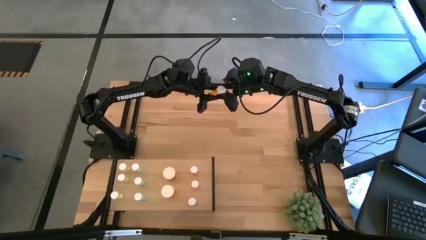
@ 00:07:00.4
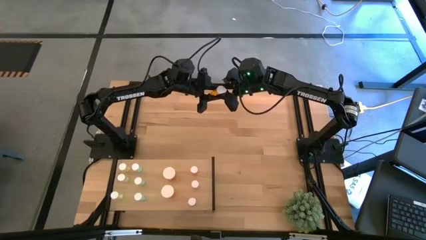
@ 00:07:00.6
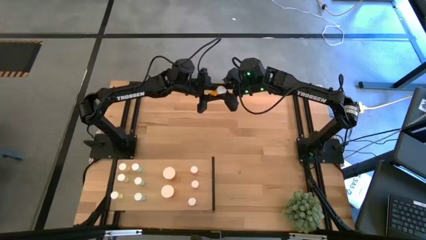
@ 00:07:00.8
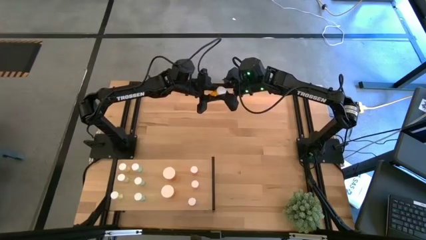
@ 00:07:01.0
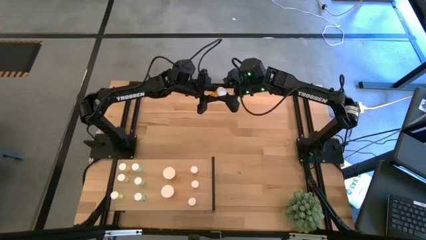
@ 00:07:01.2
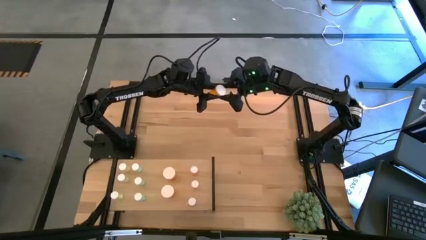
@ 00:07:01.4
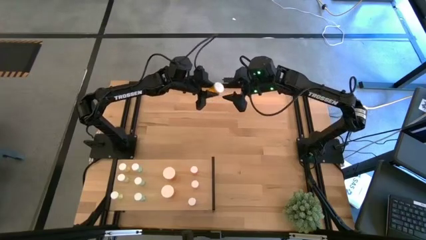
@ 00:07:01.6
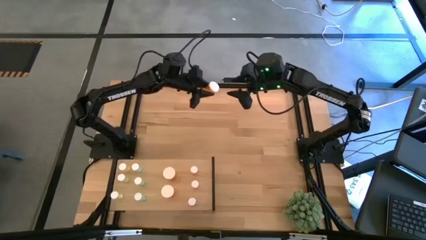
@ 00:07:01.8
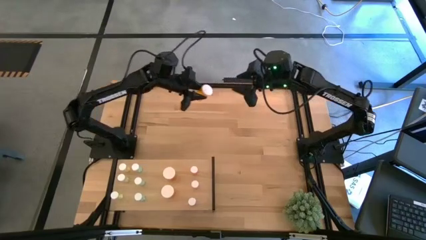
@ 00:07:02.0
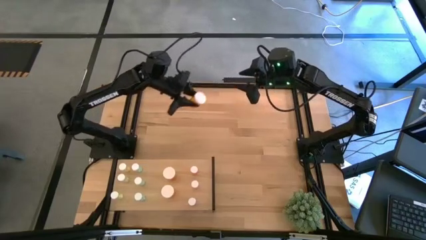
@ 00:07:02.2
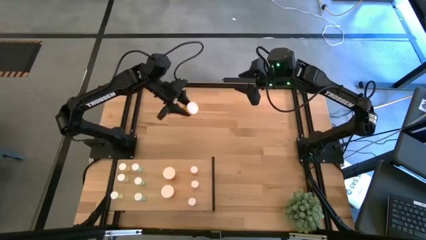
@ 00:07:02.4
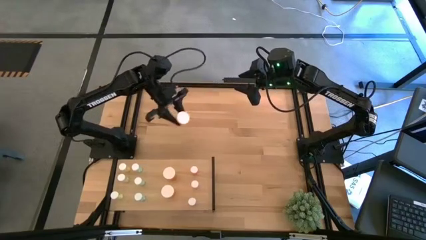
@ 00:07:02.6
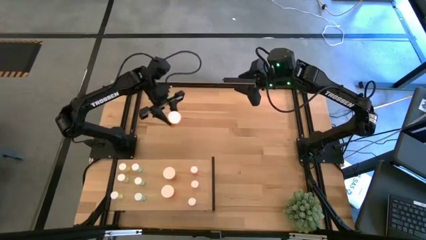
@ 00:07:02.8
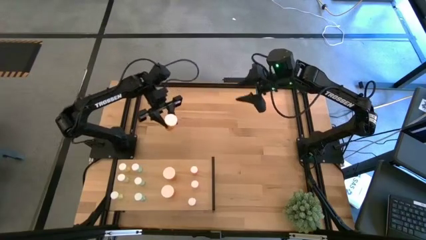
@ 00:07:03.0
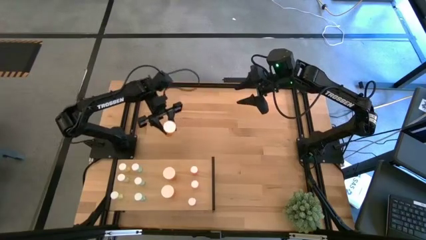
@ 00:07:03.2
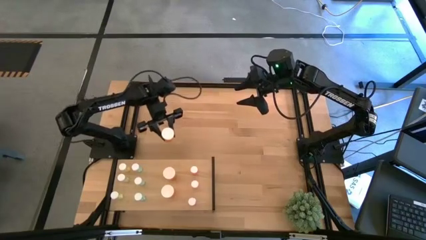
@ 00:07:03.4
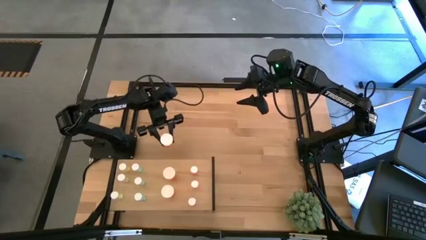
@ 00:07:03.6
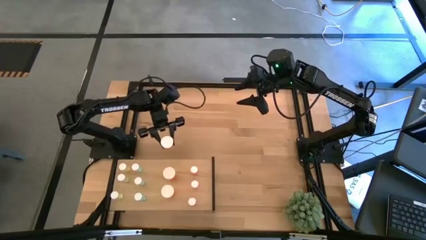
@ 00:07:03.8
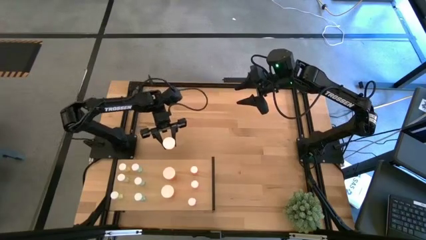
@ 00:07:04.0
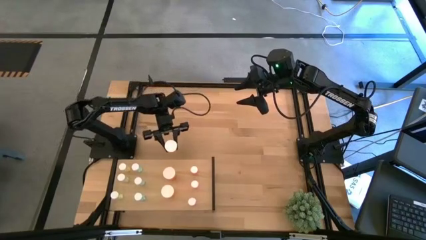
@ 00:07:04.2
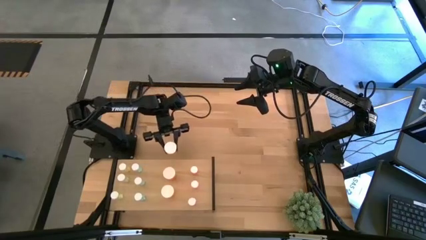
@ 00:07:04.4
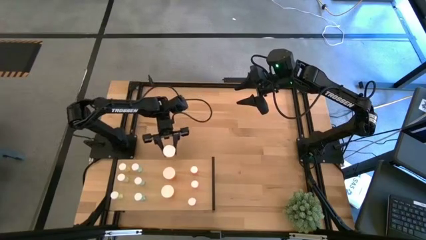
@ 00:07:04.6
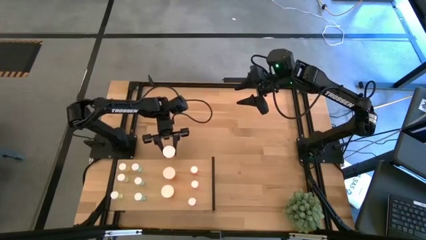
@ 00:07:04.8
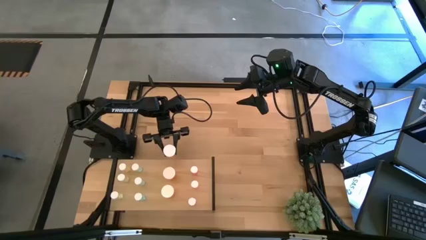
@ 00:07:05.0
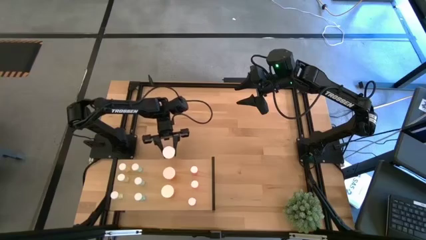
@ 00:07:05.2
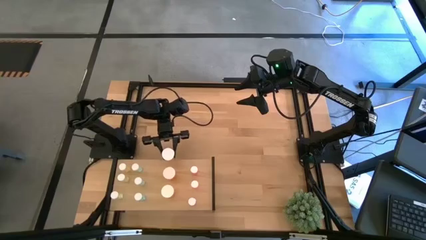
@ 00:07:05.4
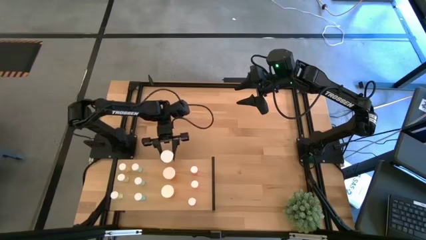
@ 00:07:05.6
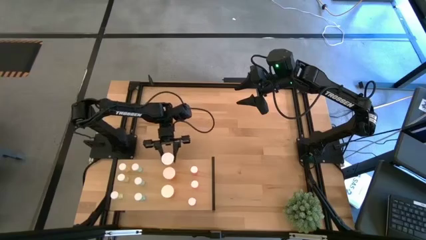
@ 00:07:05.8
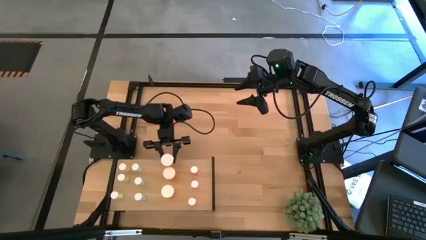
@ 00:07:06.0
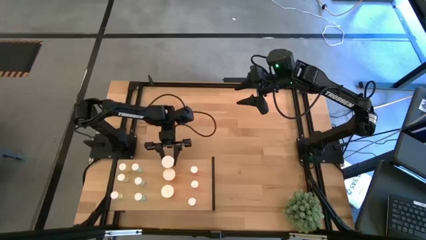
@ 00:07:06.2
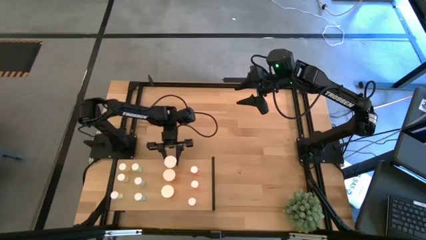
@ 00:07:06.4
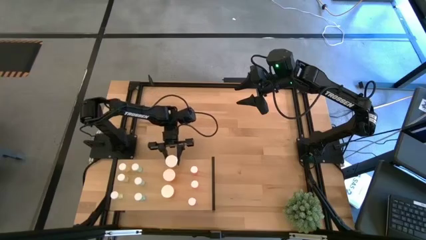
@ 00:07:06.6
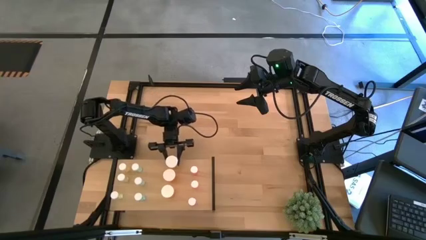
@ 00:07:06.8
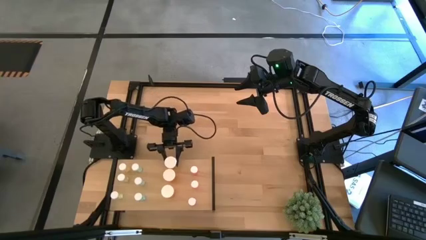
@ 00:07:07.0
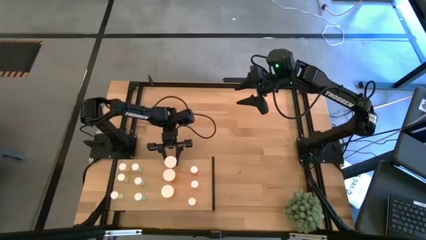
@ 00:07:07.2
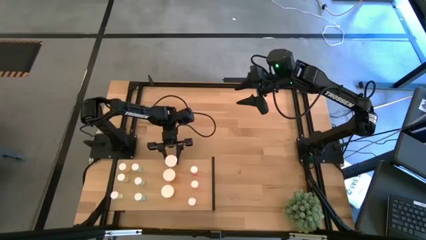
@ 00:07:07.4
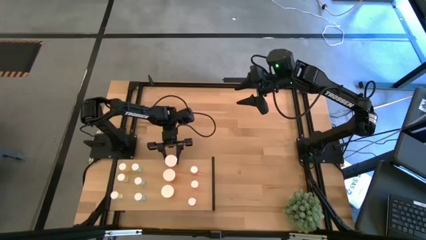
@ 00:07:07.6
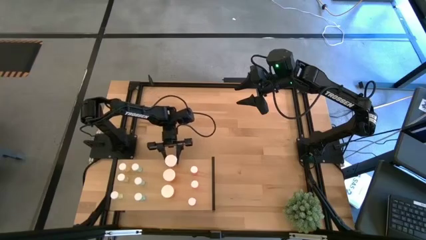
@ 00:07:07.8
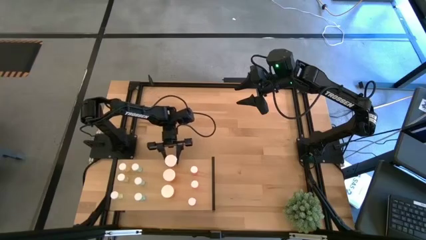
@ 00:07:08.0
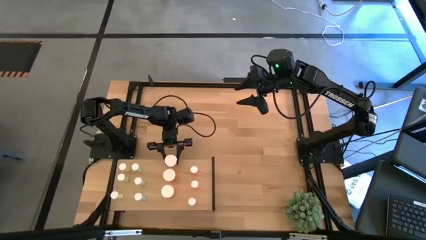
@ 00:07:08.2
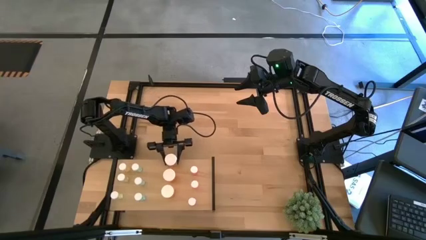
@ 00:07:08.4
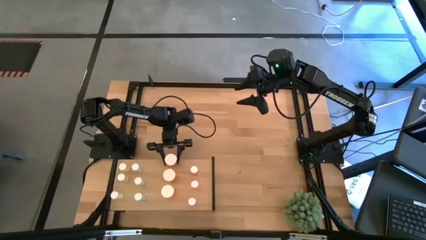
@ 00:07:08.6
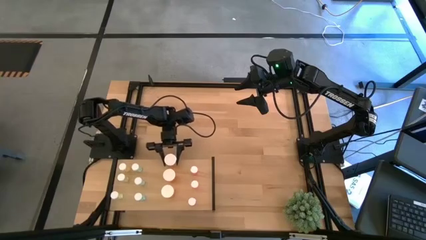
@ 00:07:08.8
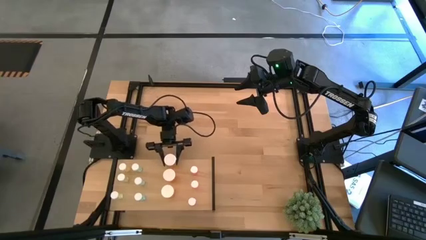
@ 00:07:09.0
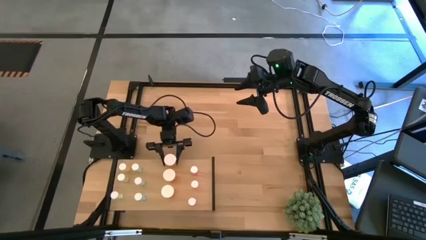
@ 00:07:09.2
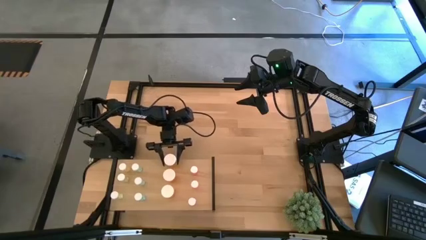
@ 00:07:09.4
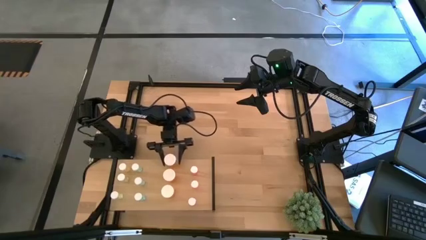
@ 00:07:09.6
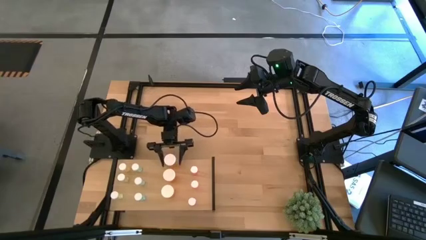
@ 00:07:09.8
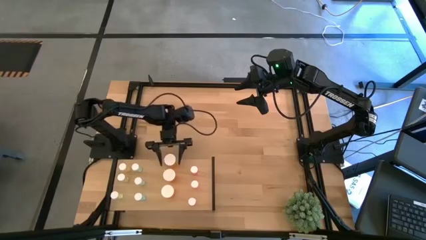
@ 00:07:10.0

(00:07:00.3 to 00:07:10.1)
Task: Pick and place medicine bottles onto shelf by color
Put the orange pill bottle on the shelf aligned with the other orange pill bottle

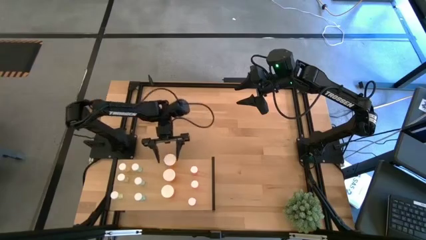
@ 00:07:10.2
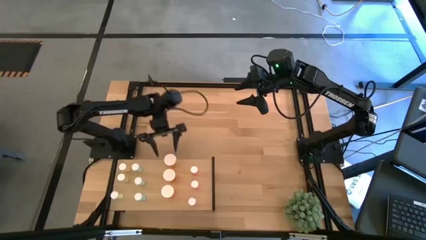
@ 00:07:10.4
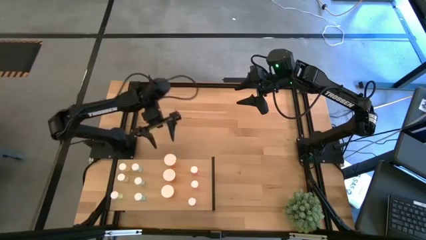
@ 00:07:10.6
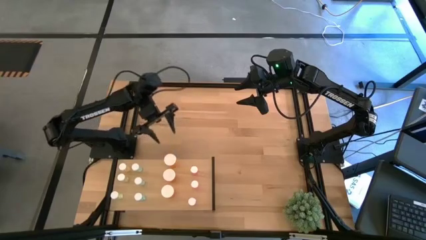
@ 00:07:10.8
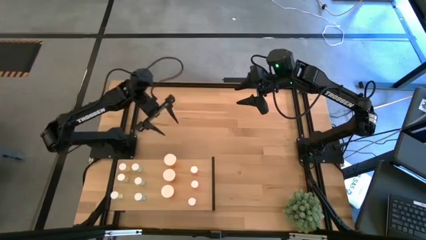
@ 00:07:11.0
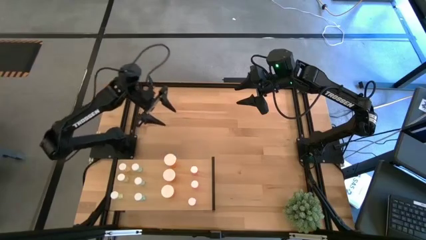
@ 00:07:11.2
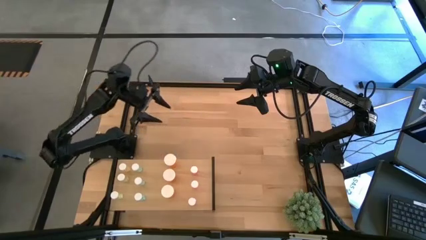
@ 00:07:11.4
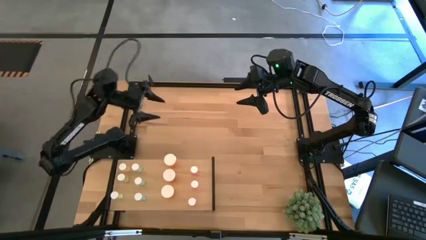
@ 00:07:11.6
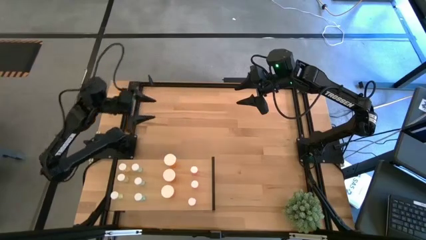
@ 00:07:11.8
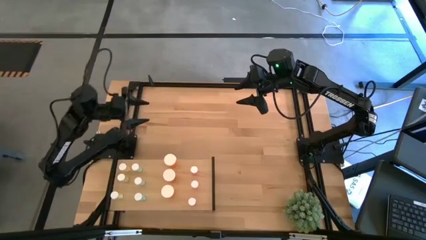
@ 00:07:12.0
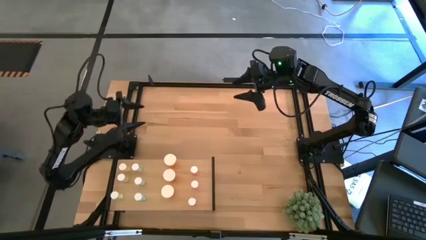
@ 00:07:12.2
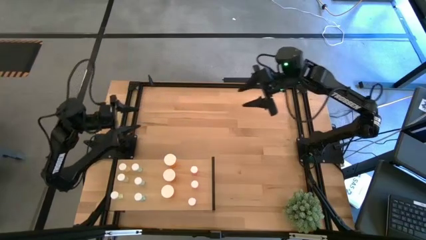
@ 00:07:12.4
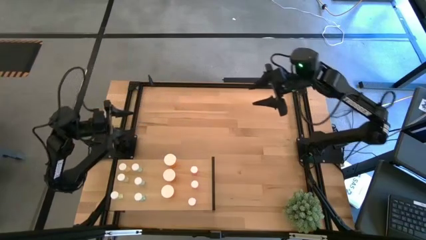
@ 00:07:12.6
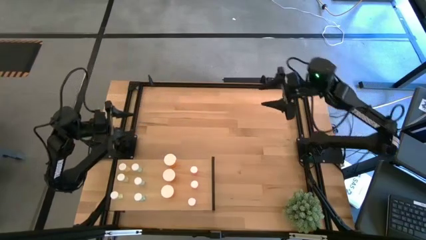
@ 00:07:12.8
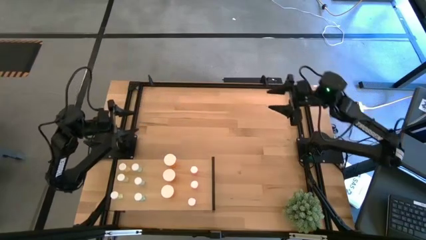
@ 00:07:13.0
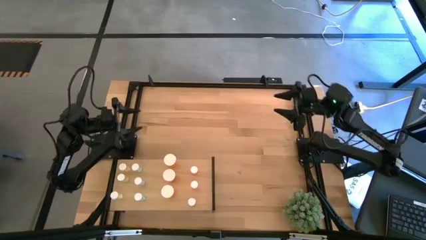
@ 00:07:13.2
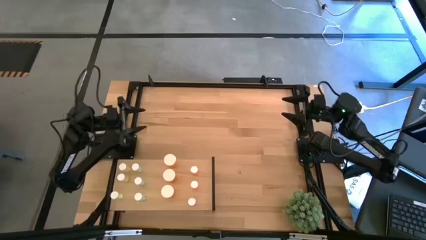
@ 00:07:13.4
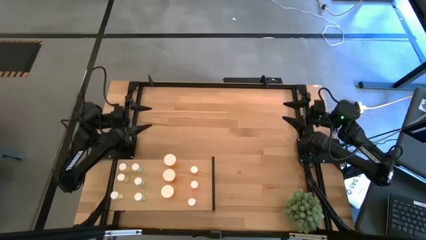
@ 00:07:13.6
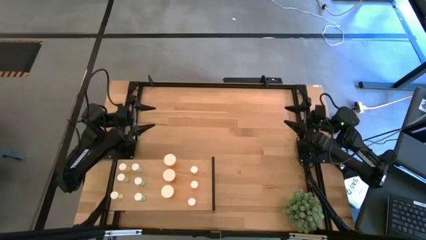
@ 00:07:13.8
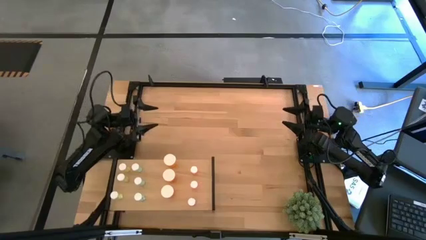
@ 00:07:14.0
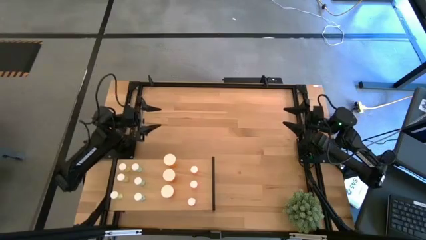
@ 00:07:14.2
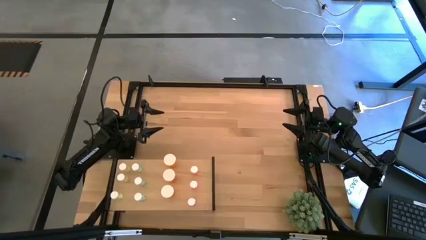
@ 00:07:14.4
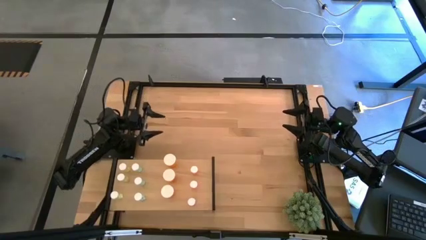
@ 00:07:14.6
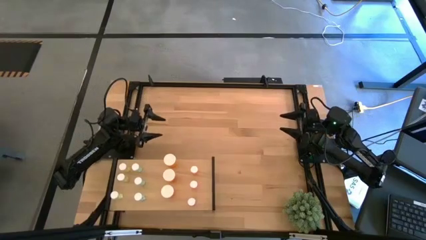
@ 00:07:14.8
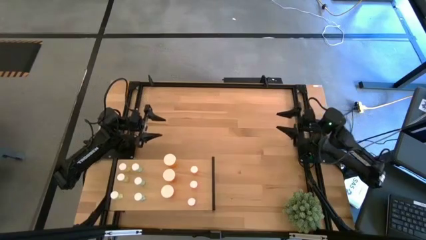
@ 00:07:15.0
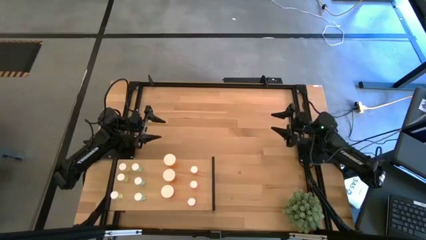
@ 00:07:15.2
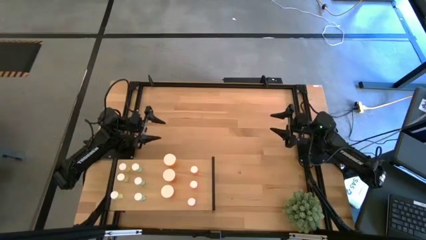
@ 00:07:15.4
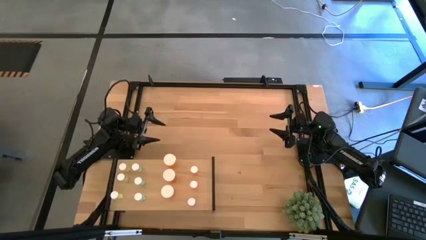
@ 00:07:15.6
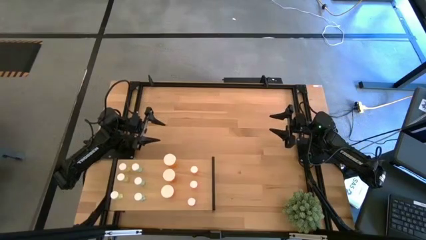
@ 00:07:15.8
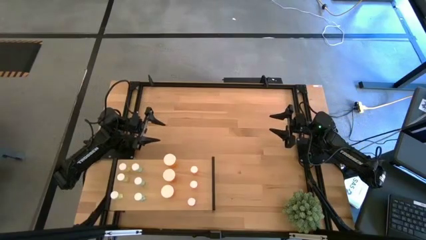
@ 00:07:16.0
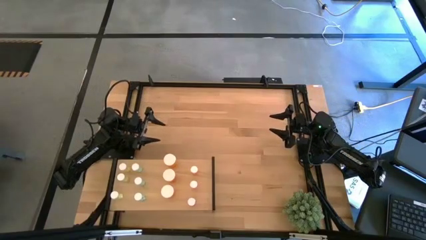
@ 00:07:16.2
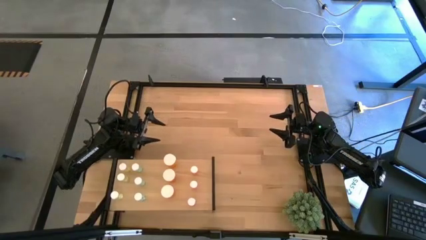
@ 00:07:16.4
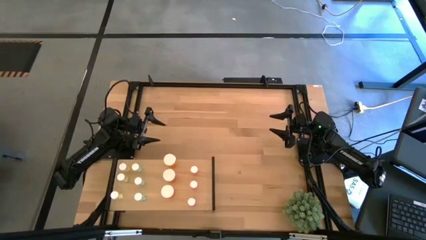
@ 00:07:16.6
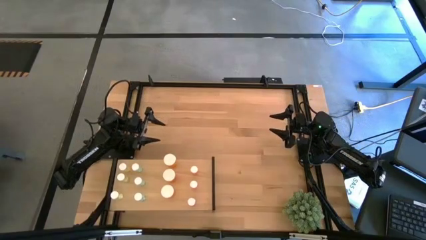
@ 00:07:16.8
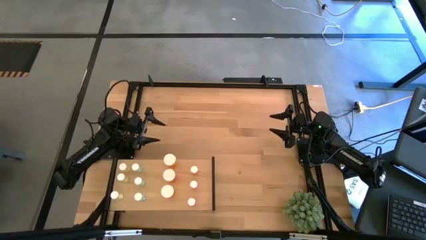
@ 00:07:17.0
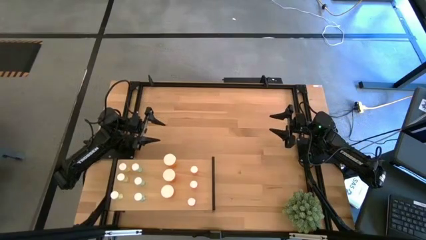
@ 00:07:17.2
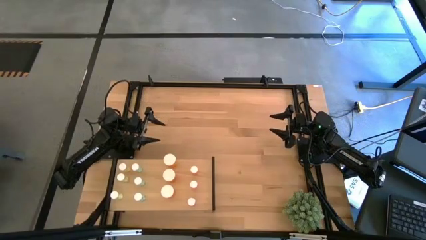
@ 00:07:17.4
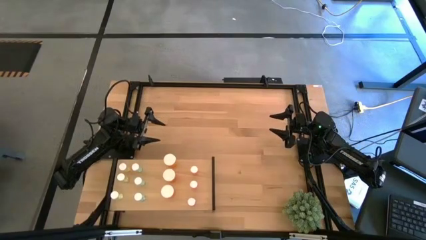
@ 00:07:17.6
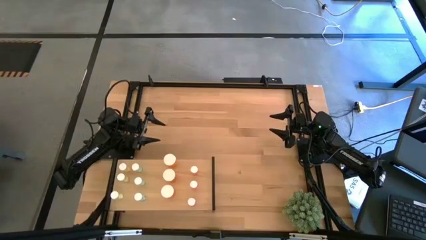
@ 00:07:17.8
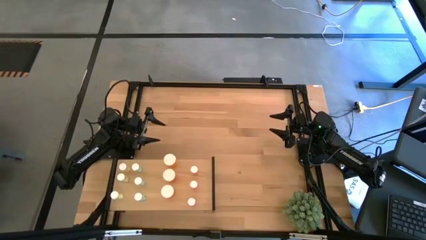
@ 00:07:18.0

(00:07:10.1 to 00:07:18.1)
Return to Home Position
